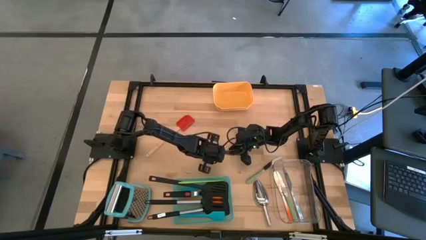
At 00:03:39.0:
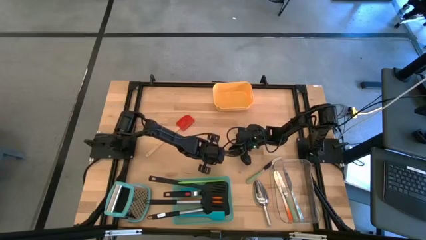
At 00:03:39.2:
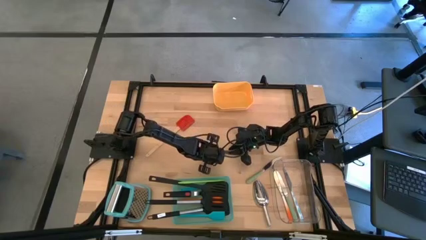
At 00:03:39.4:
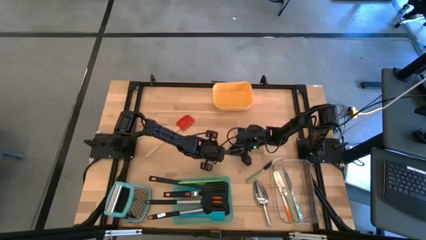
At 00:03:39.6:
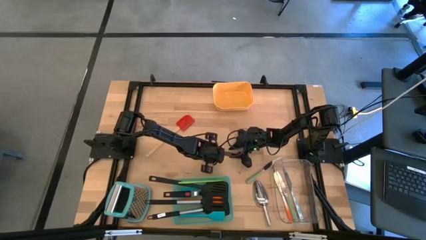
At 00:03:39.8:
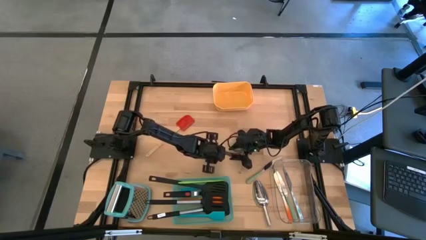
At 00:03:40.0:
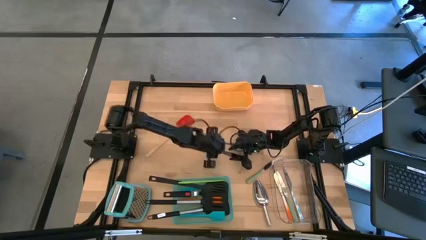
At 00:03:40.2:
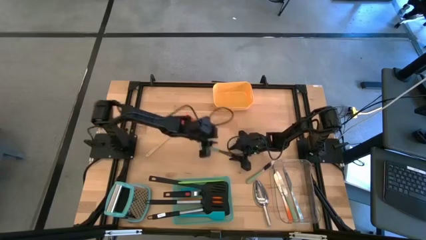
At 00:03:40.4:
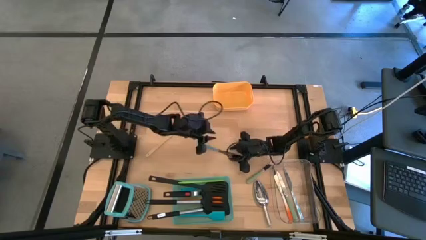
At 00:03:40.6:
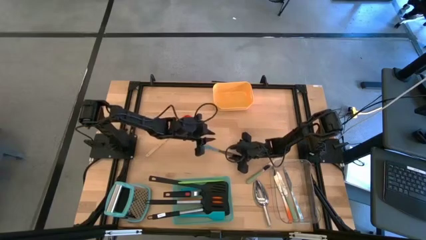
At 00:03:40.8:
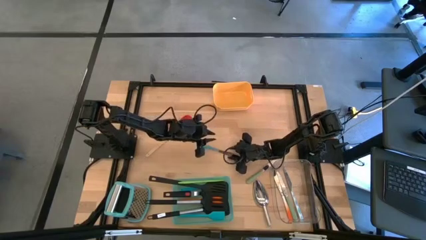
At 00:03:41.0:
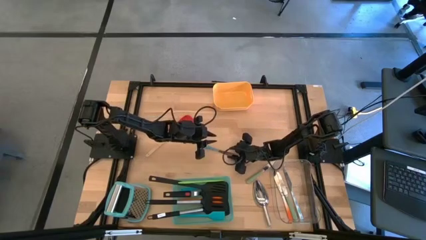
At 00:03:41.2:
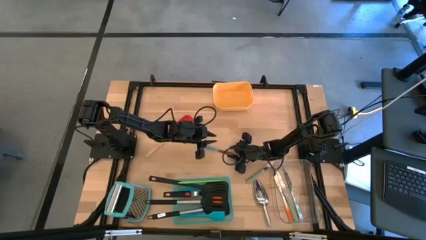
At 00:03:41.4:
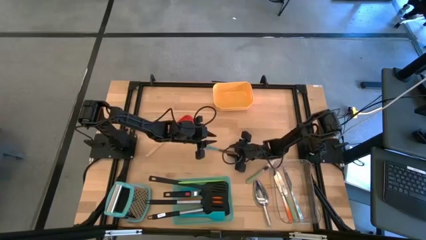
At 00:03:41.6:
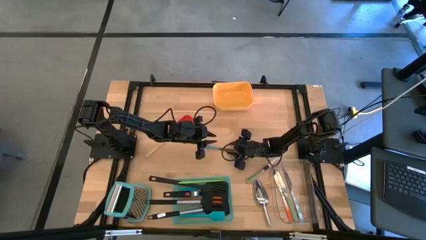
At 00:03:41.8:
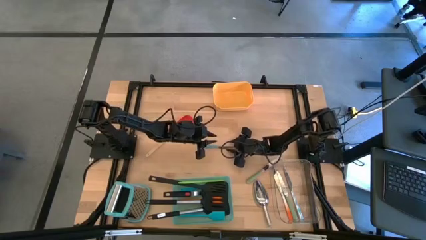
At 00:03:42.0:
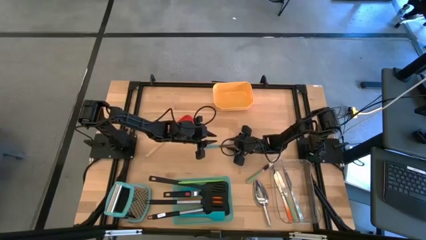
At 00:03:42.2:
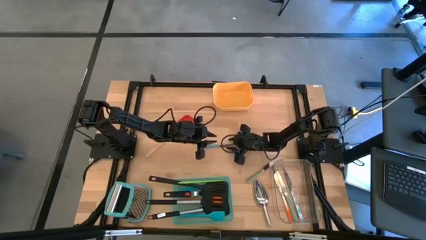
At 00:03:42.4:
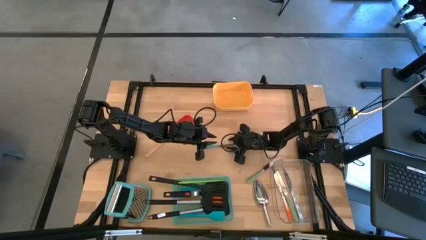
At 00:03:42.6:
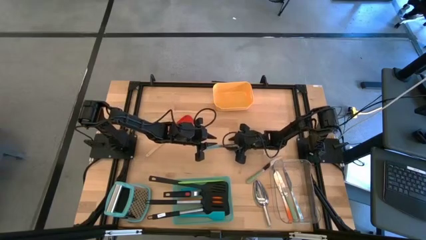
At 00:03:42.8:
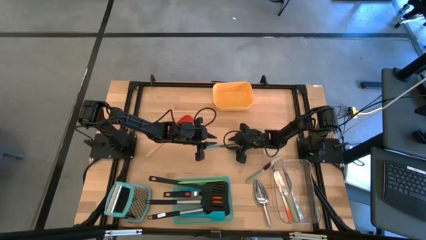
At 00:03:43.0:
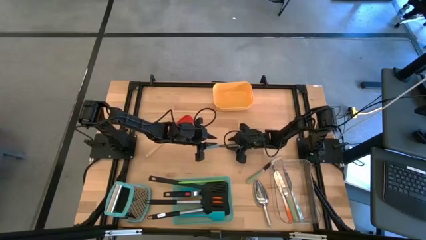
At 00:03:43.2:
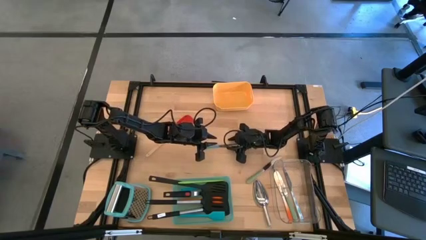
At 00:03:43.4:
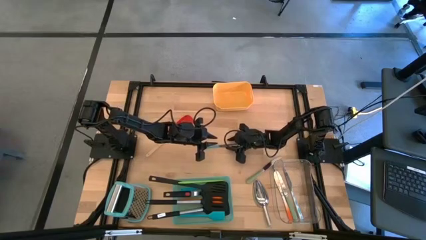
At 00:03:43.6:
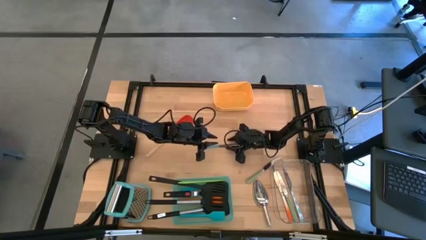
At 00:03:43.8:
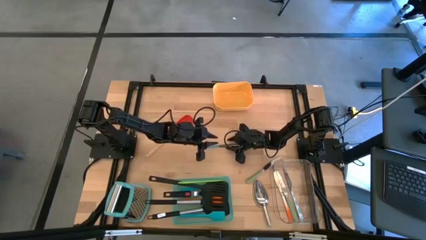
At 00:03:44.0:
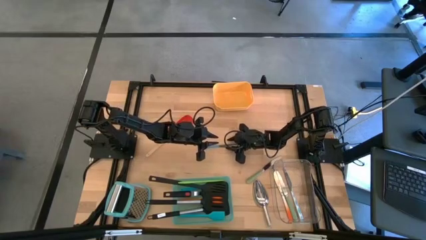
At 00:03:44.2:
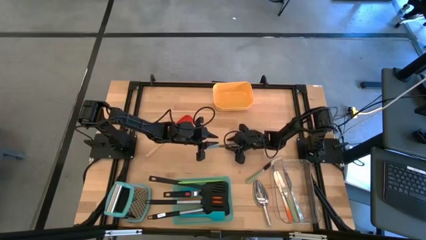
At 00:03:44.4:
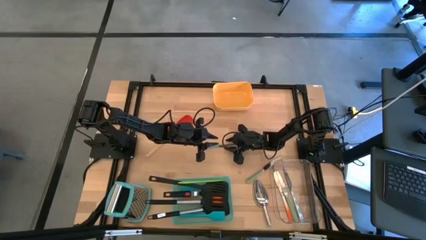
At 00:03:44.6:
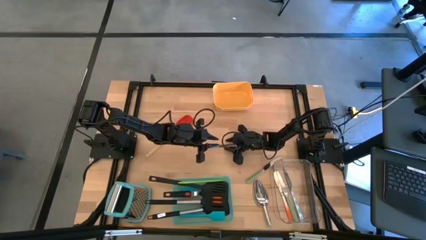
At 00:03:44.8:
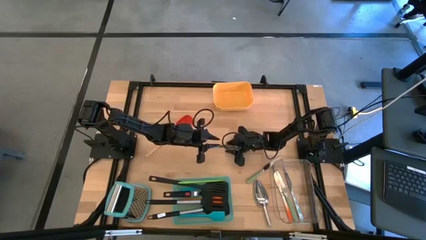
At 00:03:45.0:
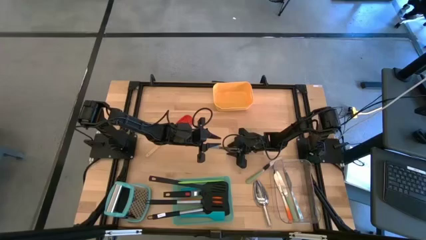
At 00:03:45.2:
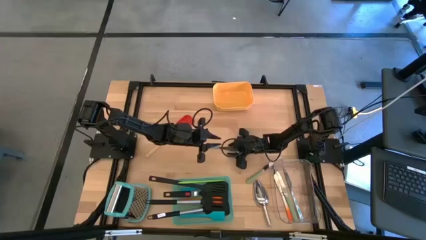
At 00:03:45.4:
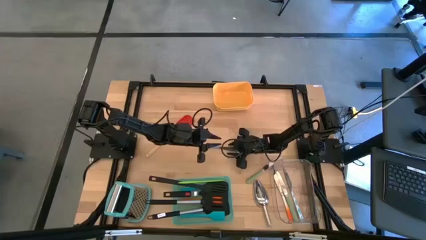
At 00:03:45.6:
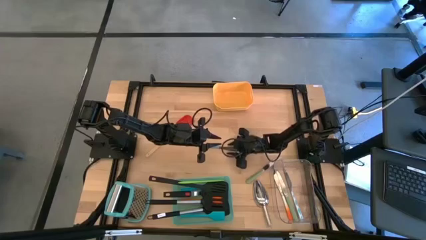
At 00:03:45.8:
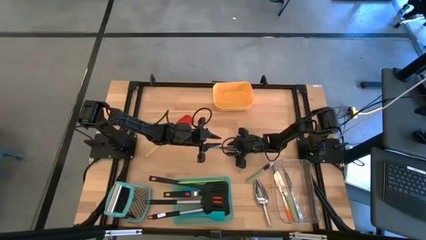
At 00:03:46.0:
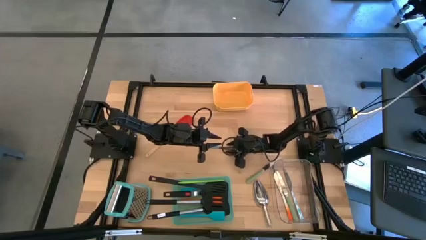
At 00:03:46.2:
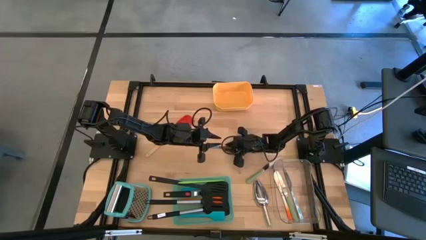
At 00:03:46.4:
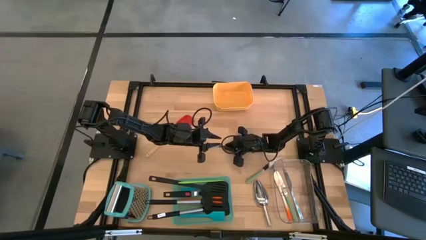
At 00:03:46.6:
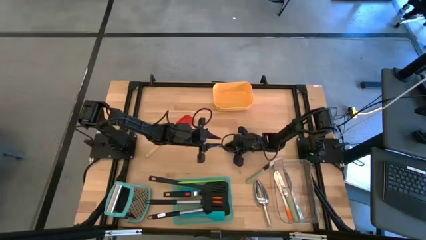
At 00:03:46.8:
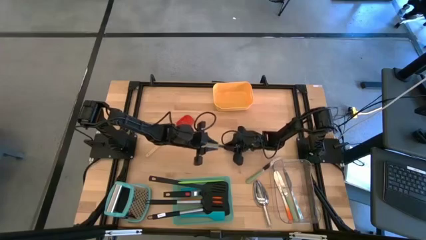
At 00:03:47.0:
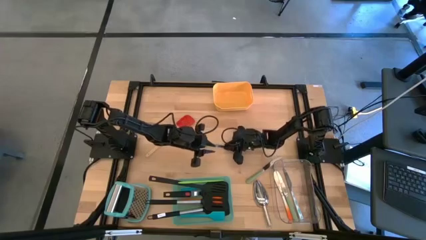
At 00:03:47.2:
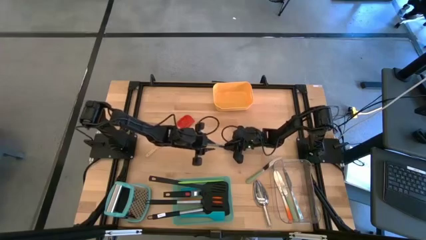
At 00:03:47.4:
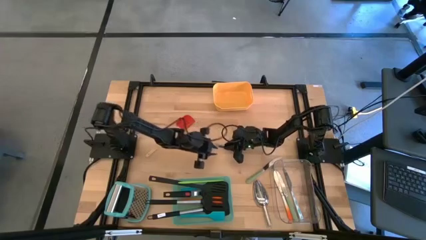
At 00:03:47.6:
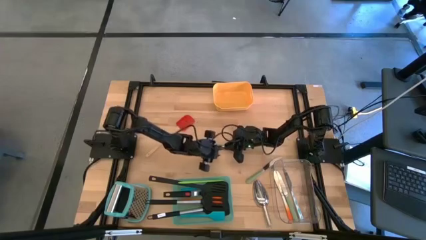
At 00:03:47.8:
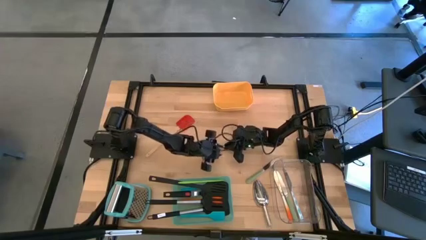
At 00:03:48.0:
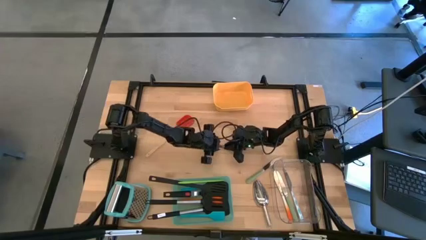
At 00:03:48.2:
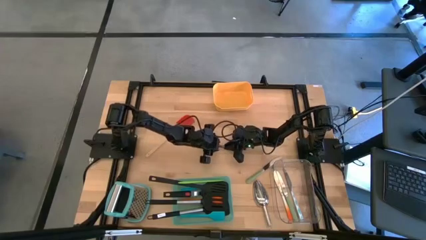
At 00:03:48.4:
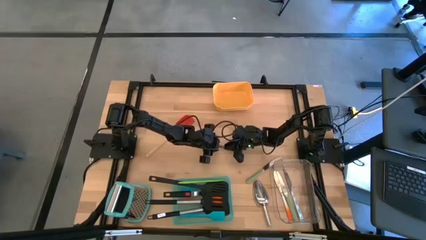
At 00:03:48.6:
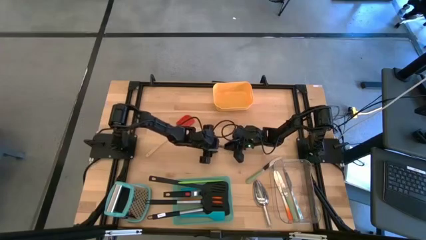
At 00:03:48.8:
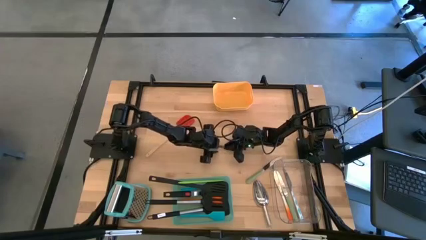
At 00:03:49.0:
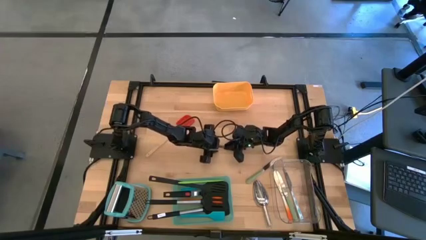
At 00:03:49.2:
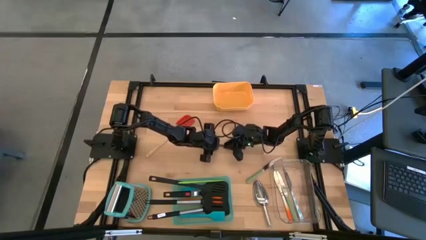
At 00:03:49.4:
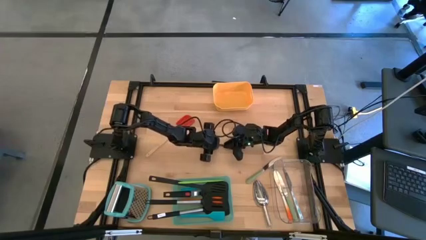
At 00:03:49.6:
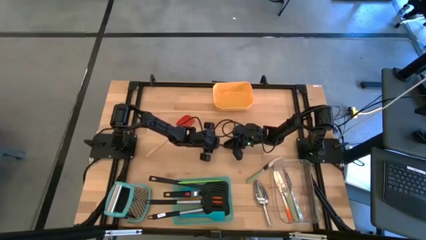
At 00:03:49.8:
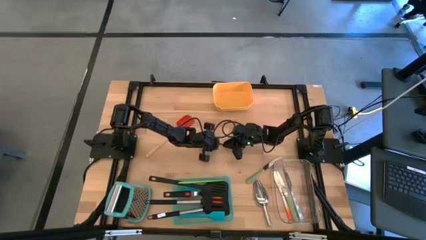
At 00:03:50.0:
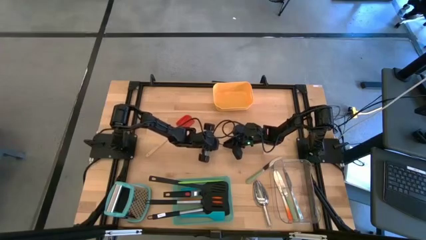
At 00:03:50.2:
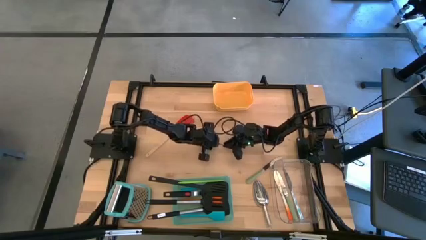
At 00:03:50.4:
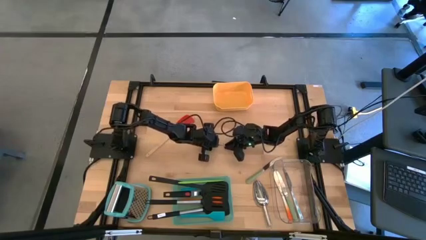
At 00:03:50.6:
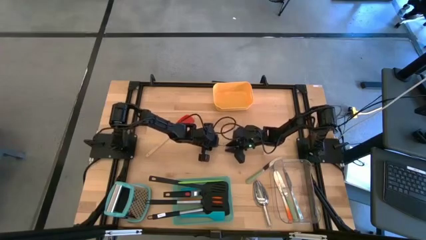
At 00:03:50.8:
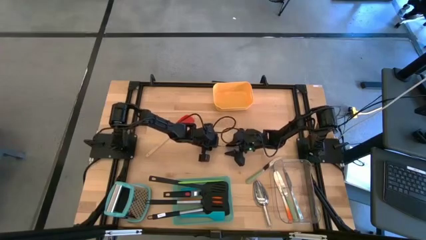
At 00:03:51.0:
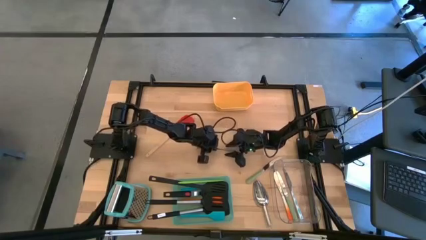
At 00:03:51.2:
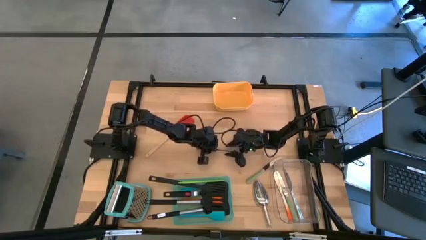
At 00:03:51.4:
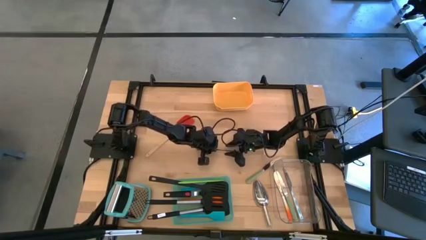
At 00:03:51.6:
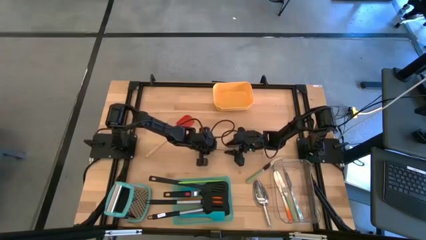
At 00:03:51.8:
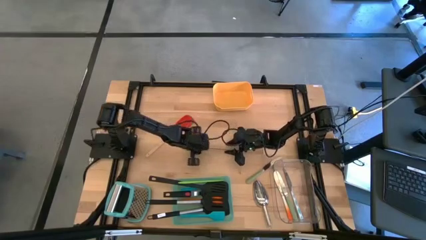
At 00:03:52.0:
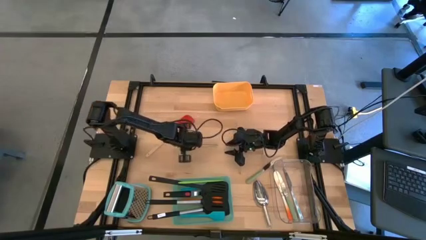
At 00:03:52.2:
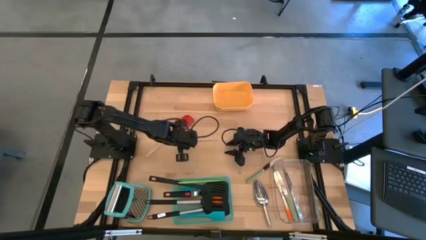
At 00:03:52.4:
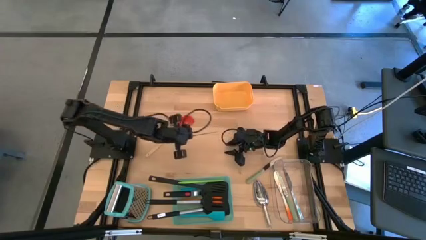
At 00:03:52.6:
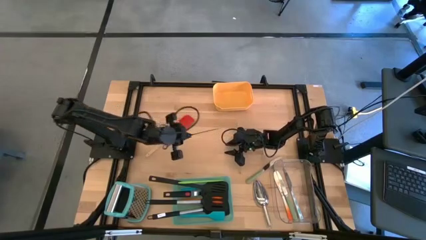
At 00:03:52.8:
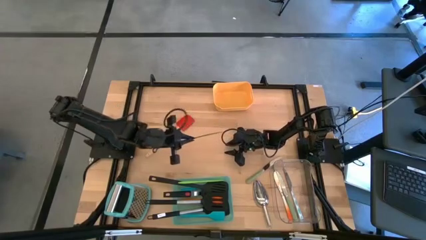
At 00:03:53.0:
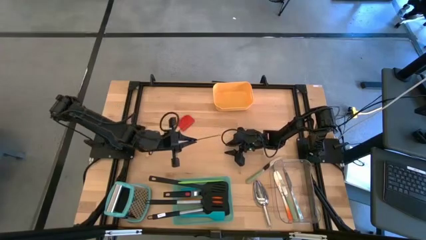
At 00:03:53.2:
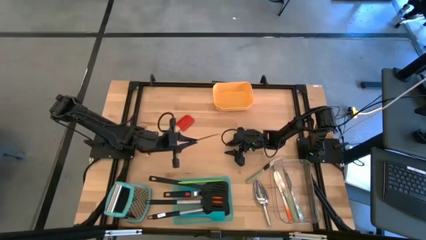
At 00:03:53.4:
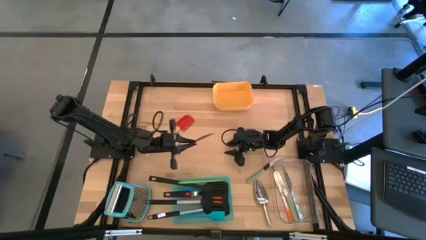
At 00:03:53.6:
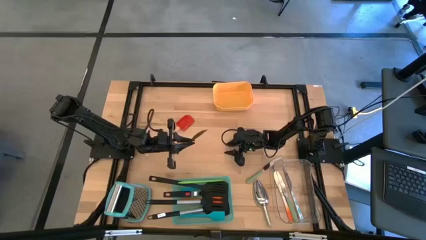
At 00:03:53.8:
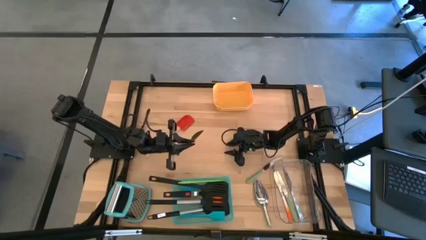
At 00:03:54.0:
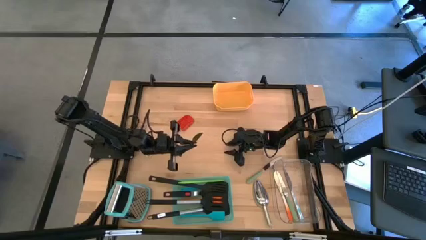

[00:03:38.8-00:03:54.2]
Task: Pick & Place Kitchen Items
Put the blue table knife into the transparent bin
